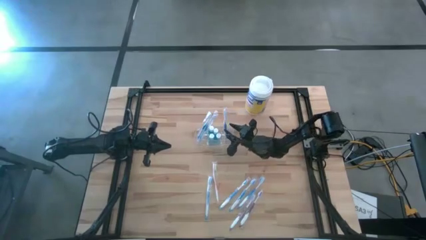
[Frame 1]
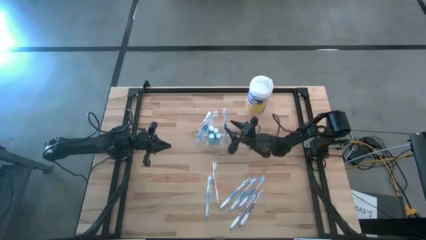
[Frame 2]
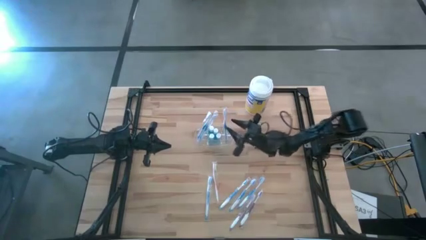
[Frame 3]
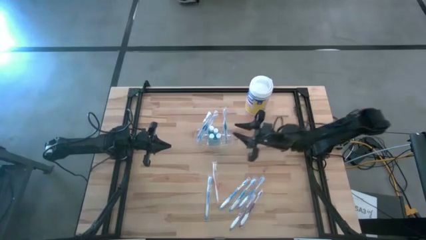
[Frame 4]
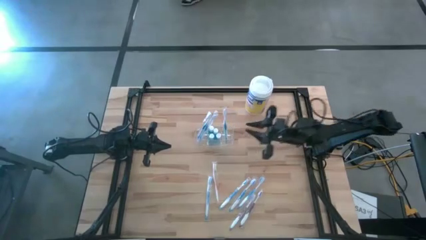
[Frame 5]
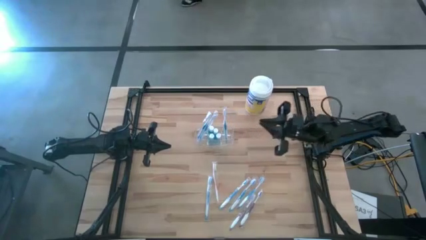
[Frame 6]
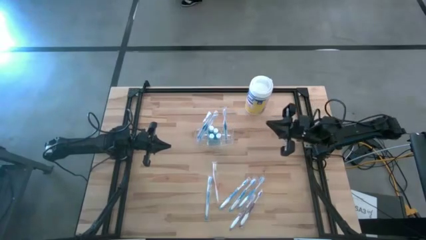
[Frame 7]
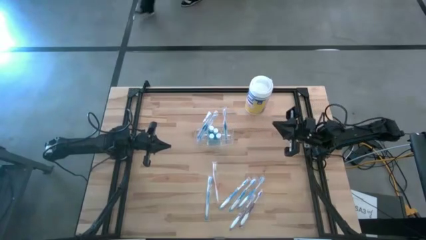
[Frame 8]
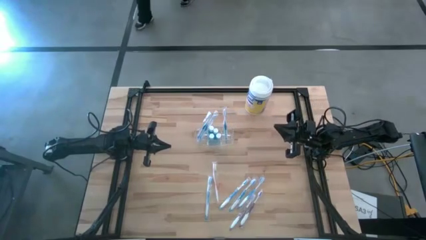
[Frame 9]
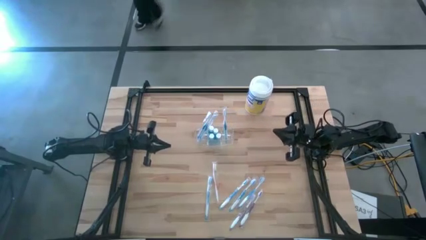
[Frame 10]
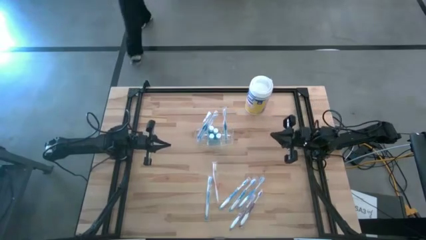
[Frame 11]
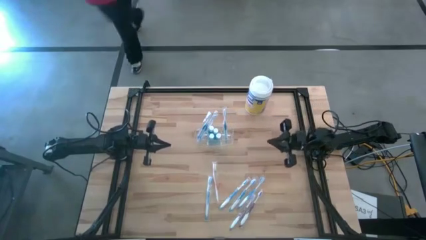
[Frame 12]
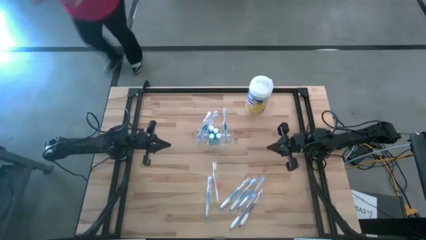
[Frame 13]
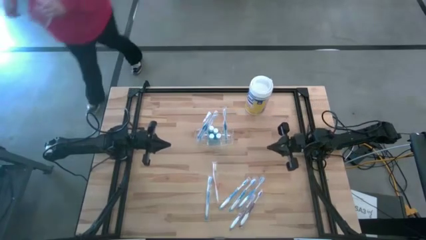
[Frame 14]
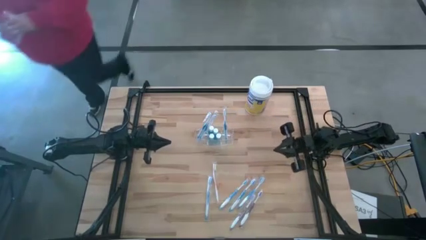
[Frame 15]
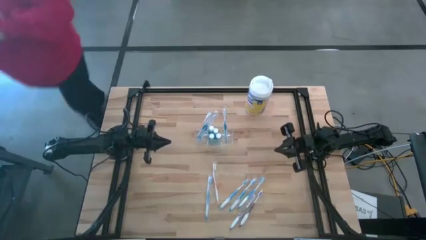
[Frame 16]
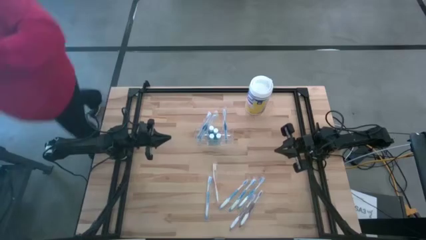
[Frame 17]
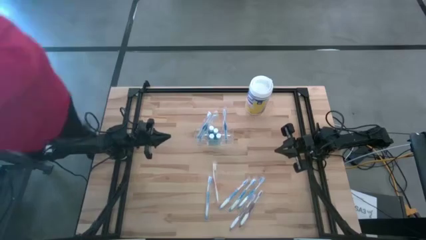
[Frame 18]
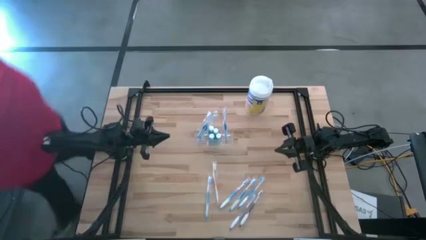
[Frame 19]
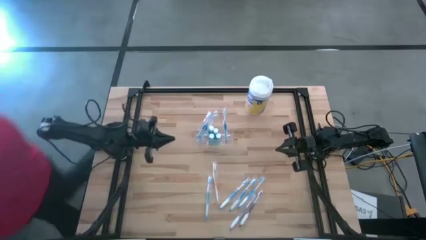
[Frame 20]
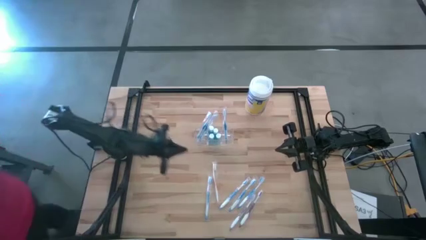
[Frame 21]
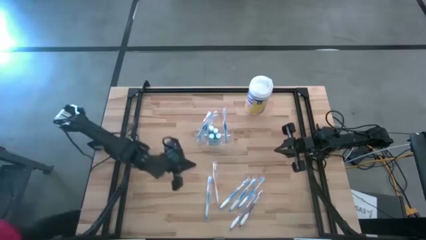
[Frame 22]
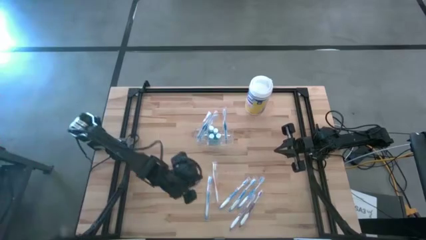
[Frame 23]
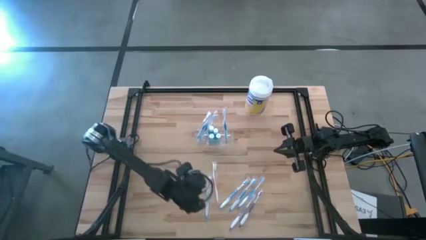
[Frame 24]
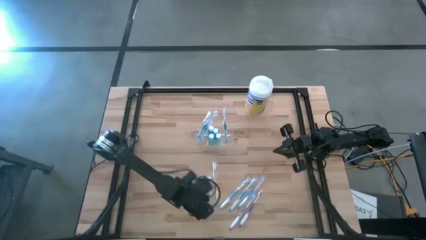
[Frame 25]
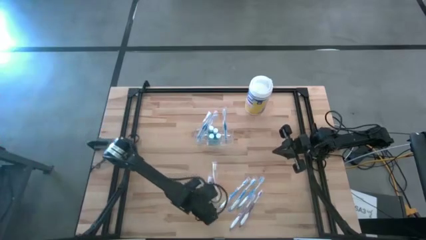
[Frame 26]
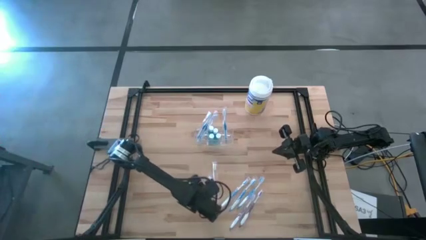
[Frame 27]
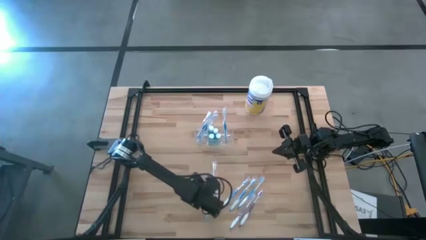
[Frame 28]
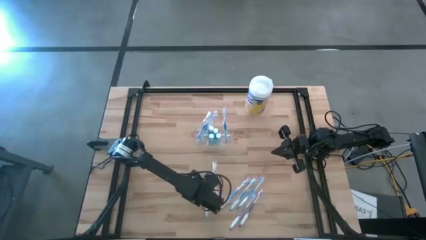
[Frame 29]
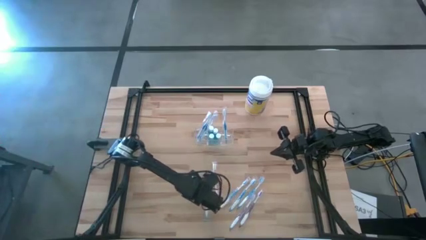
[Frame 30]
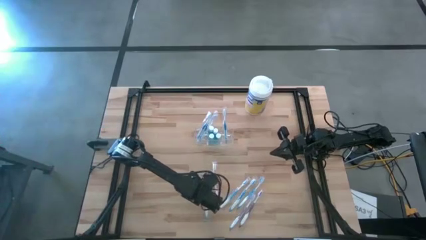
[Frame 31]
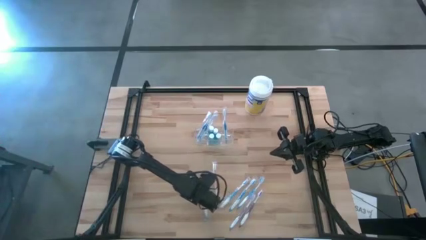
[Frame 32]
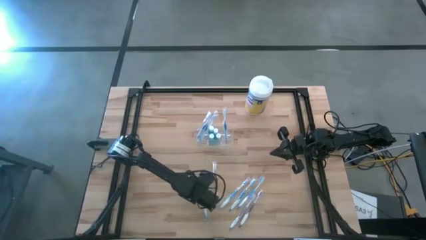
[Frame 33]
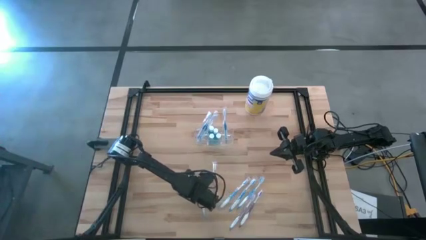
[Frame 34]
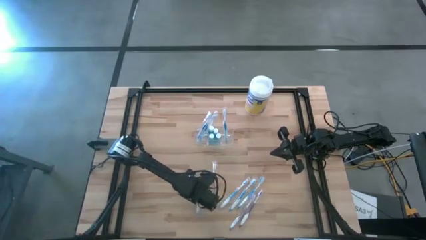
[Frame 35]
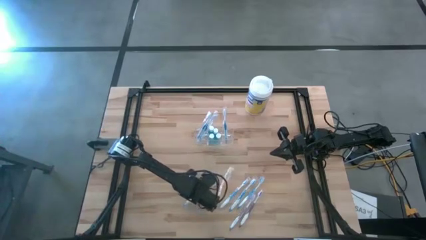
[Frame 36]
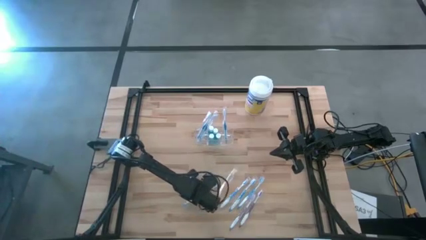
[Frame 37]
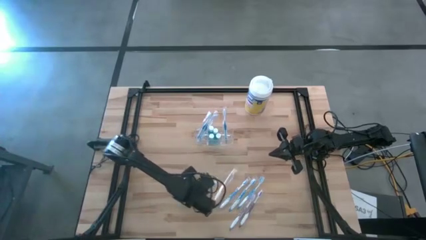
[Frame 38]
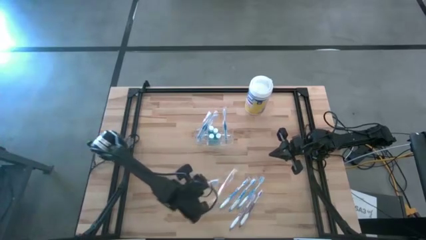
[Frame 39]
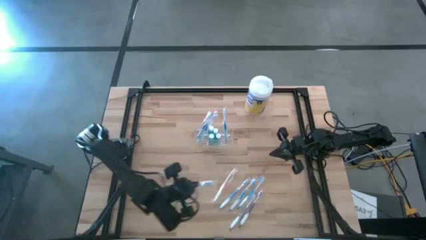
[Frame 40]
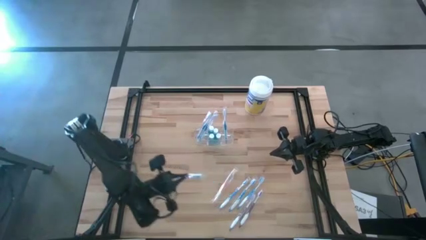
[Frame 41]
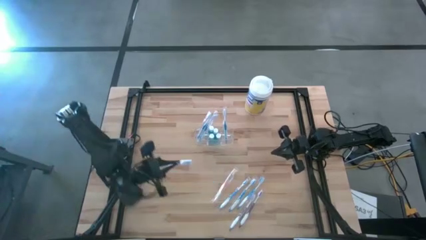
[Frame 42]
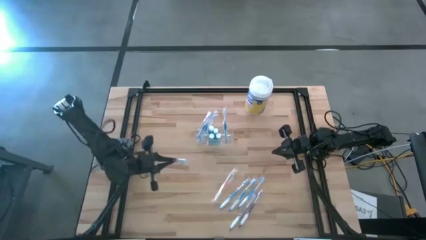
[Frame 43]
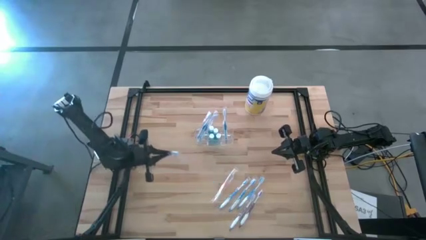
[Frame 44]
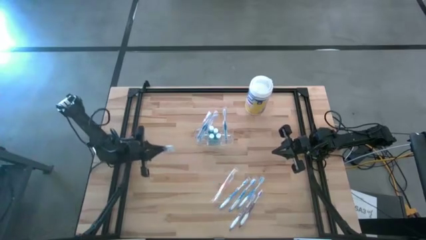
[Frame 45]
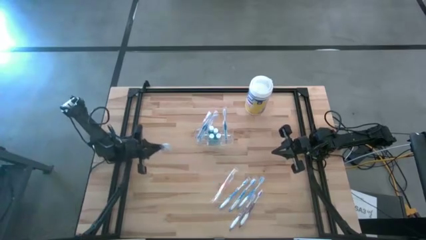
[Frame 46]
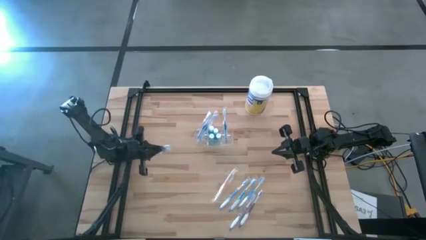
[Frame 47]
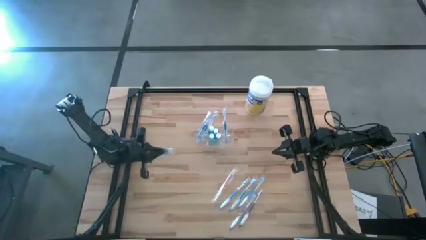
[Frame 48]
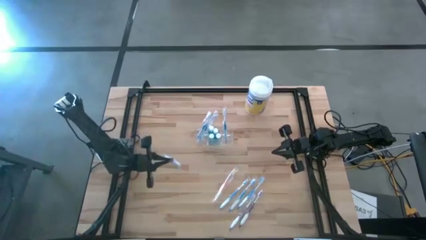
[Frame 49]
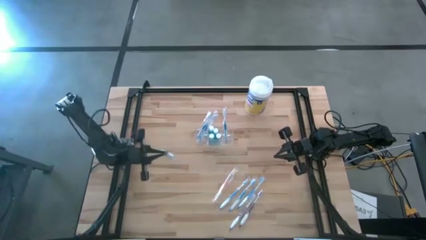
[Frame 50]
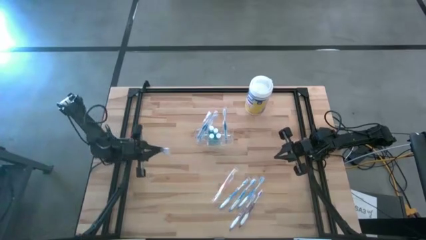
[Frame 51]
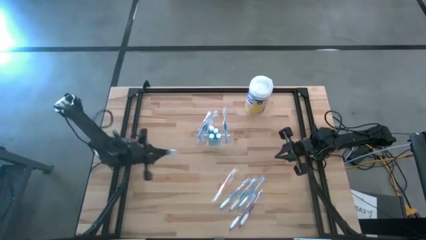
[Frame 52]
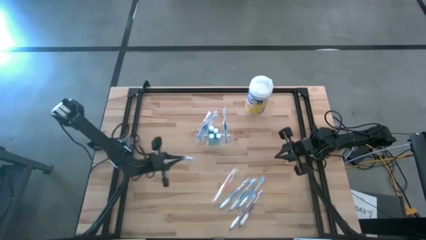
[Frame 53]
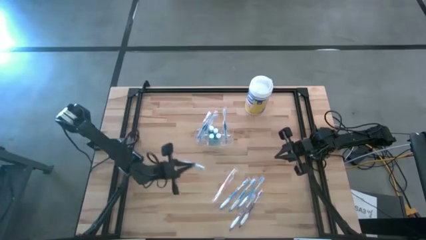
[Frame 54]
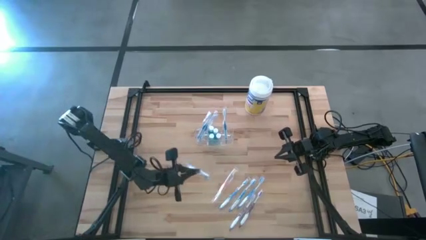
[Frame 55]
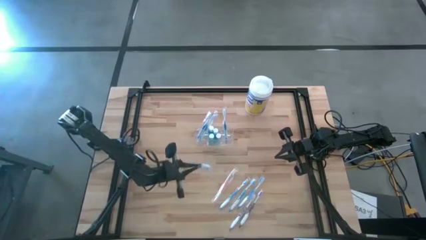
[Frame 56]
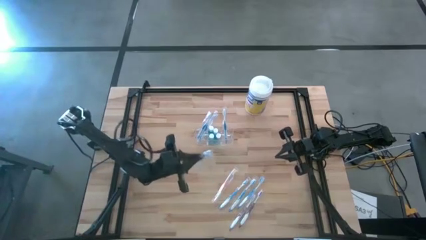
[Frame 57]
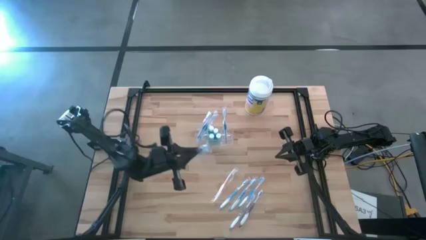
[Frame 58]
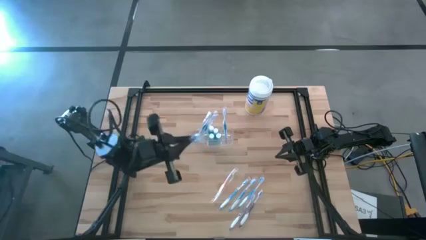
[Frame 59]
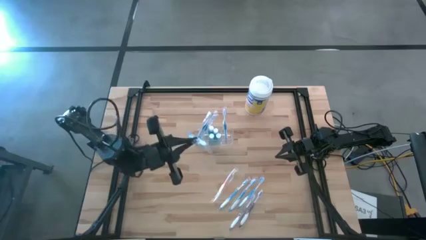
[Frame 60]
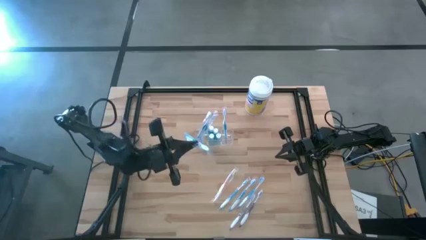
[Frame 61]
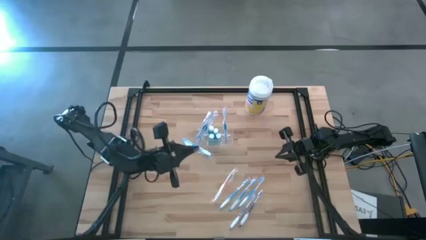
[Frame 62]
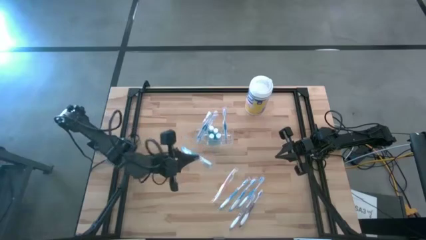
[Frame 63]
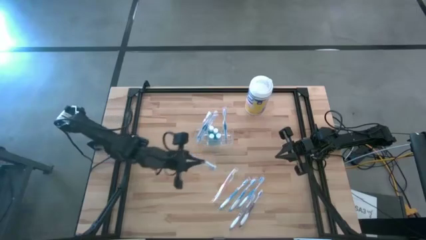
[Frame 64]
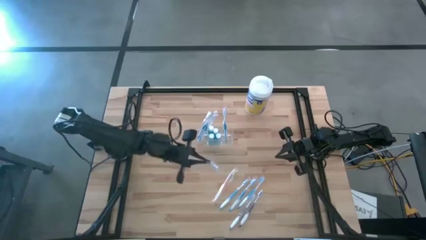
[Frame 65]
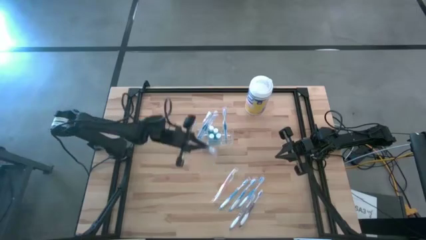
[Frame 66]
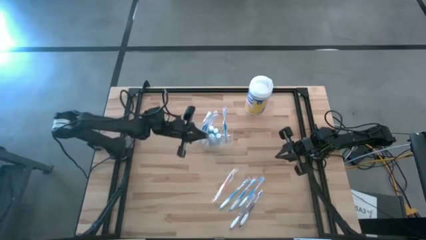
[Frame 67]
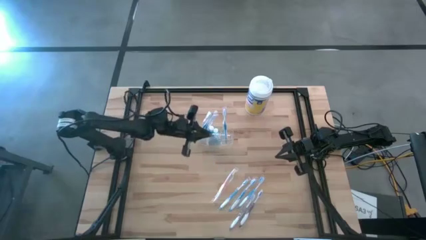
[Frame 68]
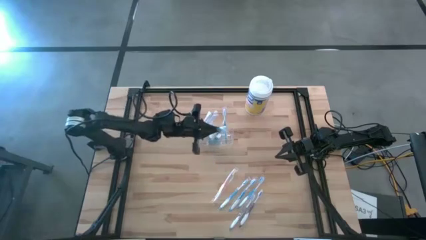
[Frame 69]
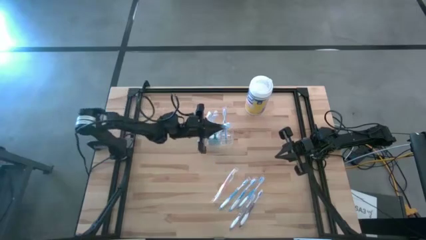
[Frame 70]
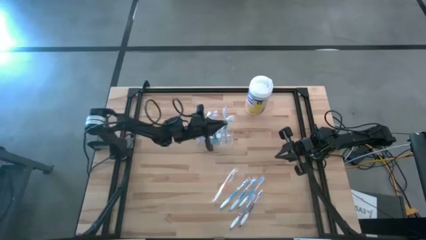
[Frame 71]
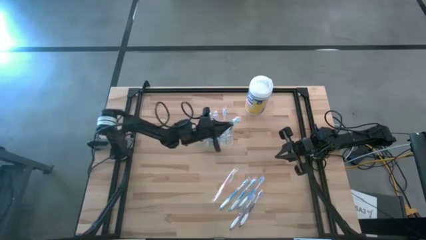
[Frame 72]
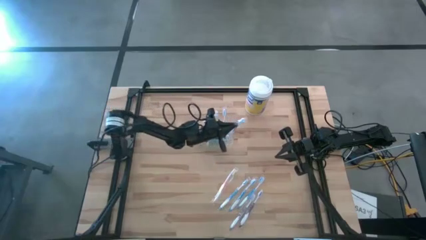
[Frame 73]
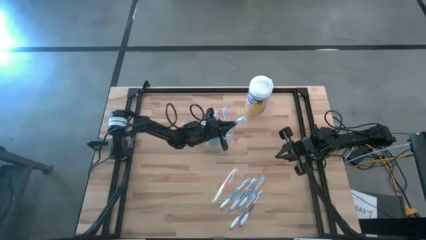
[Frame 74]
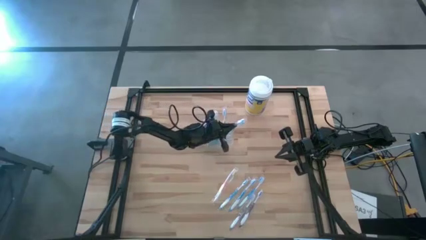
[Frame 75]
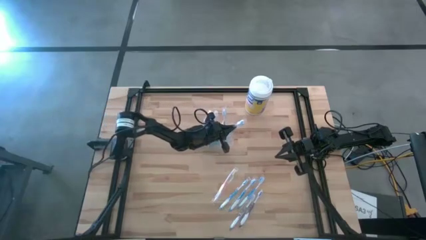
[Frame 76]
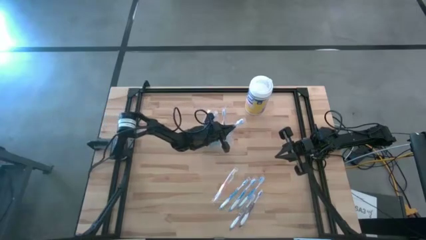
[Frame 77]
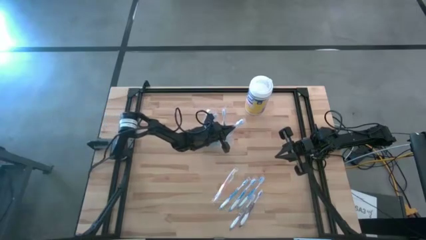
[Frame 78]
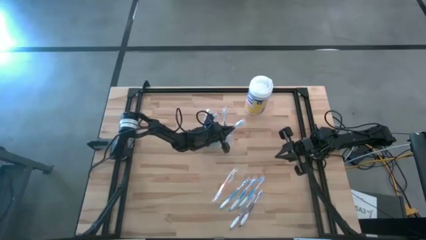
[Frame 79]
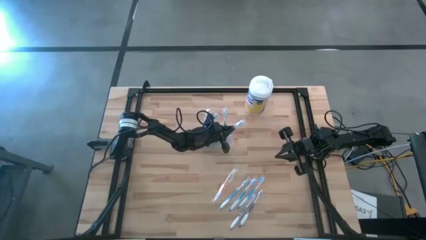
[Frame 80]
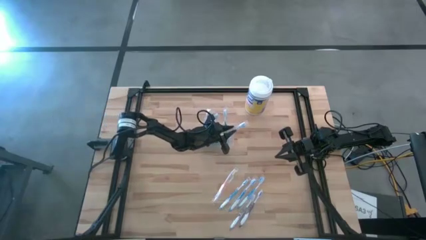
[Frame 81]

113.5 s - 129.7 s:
Task: Pick & Place toothbrushing station
Put the blue toothbrush into the transparent organizer
